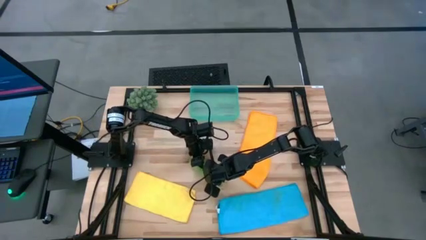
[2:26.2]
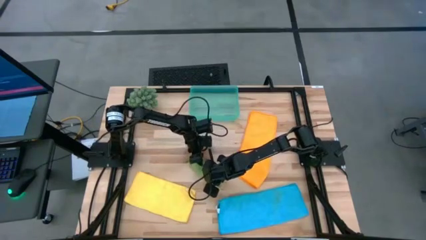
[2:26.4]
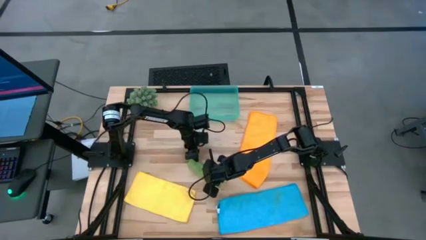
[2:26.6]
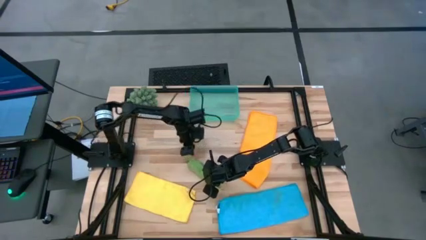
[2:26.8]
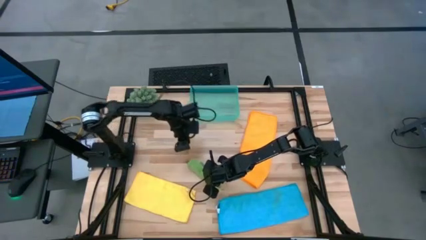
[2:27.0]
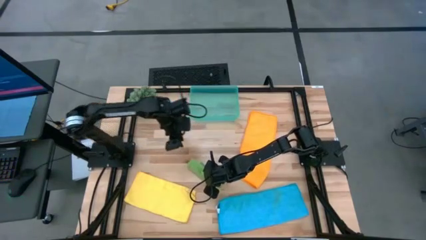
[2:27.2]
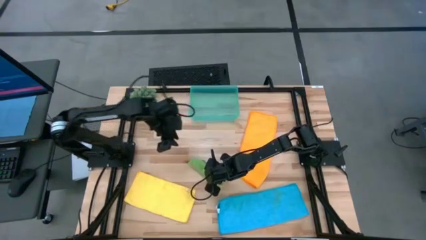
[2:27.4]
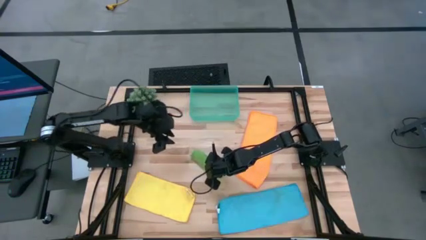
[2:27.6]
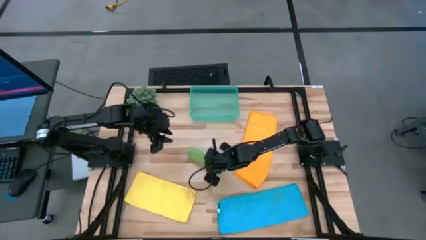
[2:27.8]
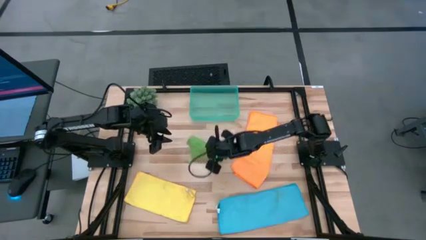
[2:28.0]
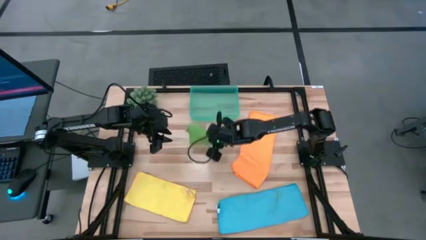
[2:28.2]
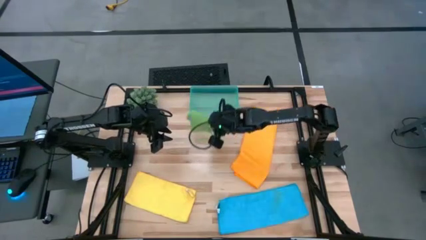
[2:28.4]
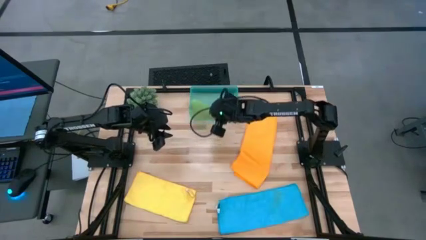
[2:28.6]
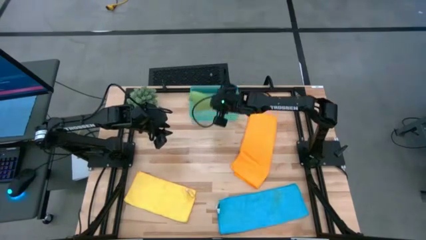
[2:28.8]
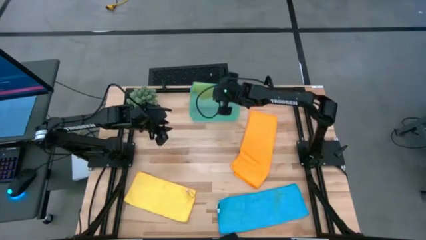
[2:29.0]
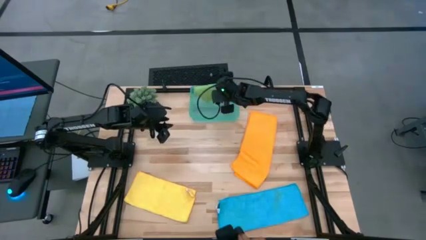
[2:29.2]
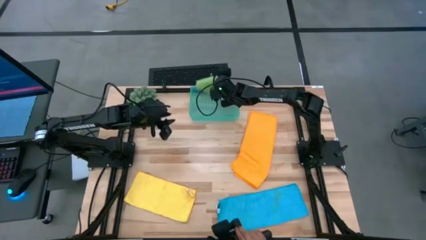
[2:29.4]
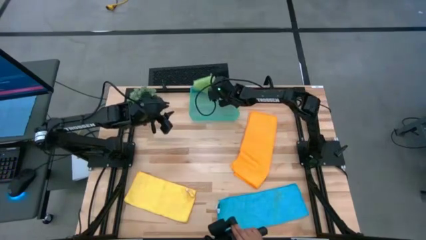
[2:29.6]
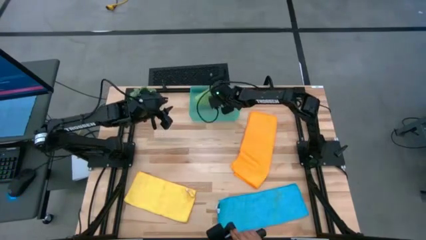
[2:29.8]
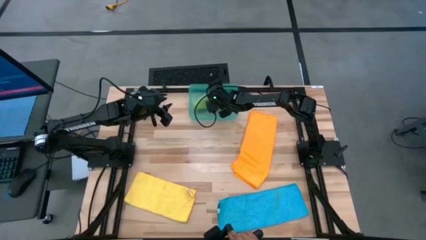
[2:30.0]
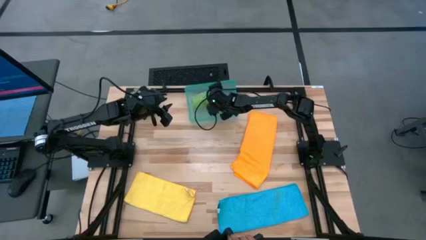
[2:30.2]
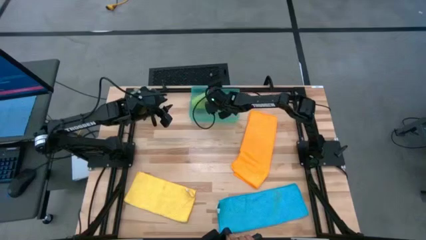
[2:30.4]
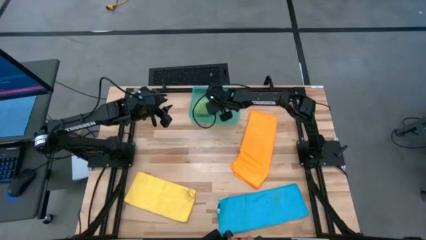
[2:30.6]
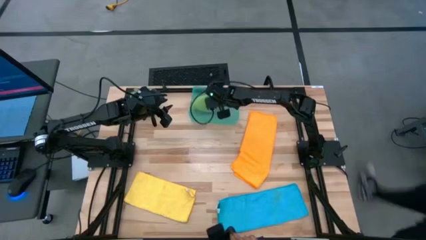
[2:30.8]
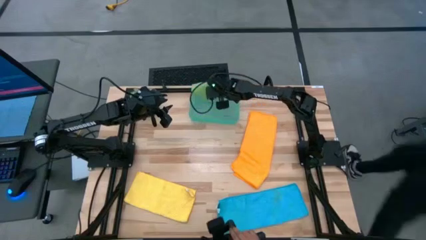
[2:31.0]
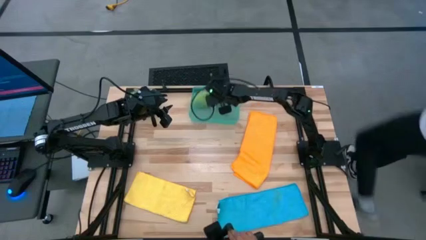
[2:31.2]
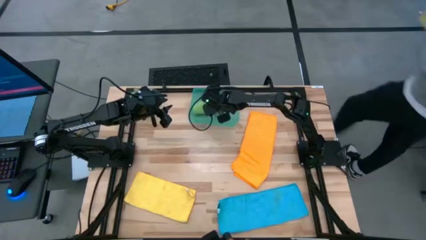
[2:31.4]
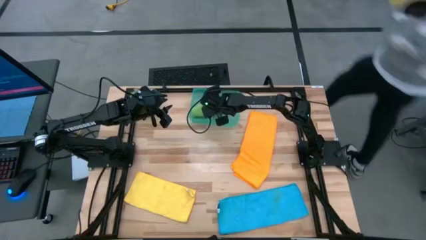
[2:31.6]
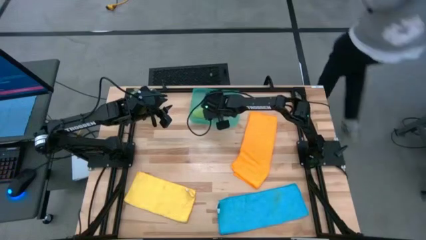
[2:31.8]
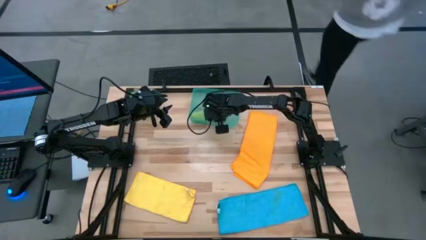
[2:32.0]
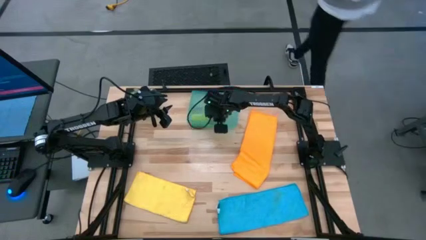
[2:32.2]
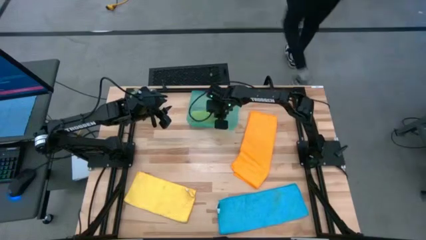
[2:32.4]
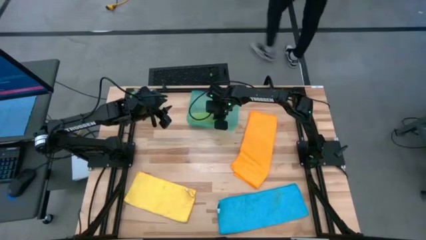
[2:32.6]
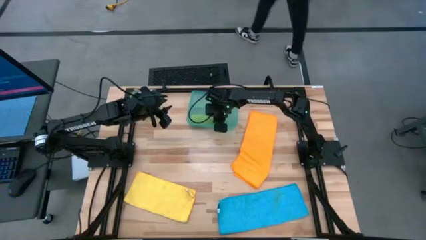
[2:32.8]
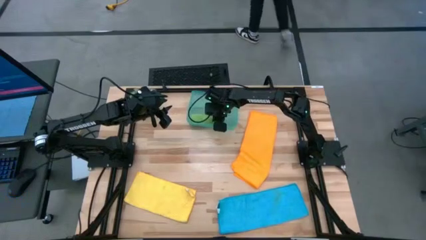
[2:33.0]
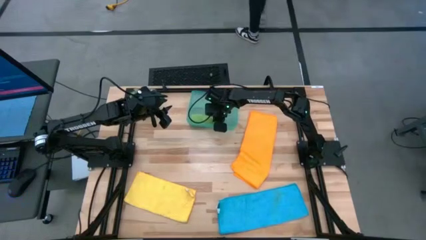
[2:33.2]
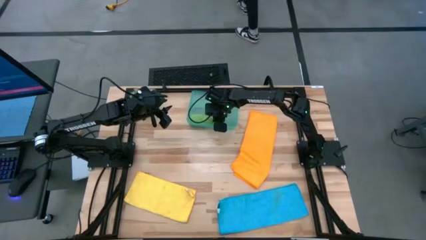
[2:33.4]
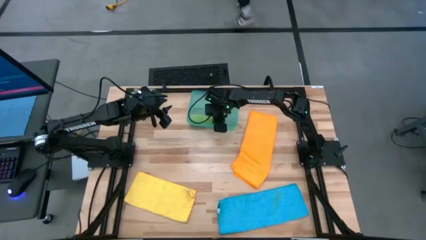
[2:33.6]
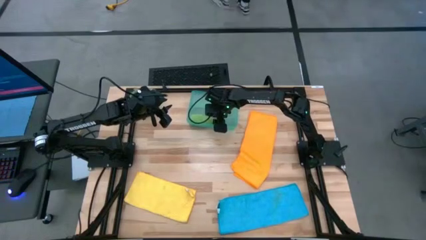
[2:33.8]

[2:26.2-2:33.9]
Task: Roll microfiber towels into tight, uniform cylinder then place into a basket
Put the rolled green towel into the blue bin

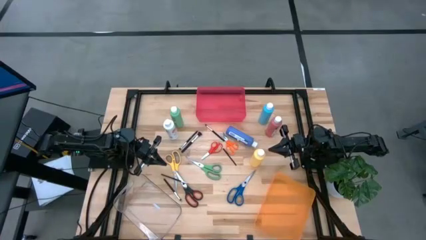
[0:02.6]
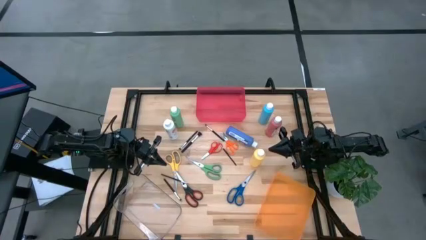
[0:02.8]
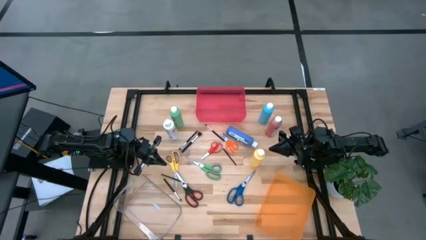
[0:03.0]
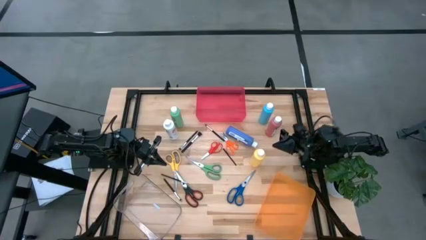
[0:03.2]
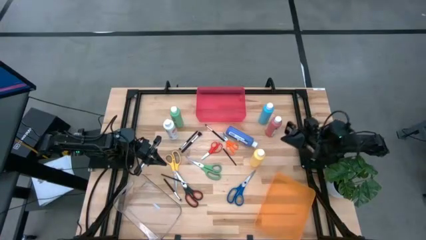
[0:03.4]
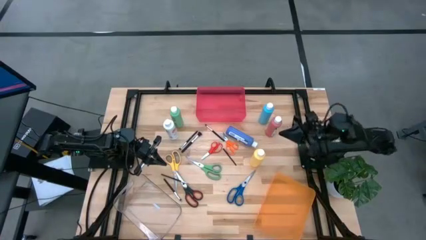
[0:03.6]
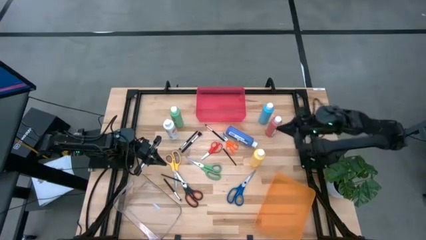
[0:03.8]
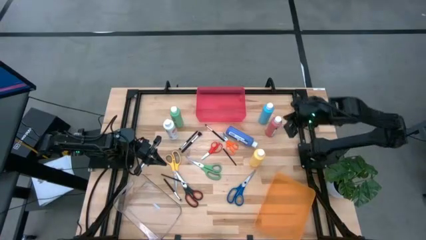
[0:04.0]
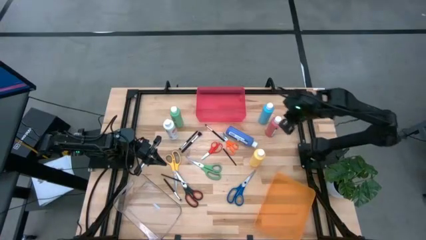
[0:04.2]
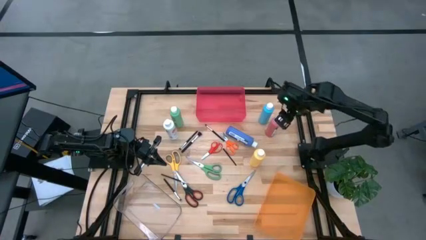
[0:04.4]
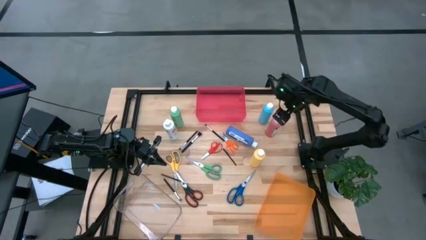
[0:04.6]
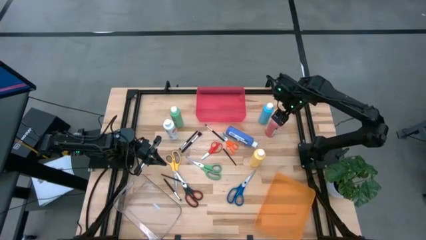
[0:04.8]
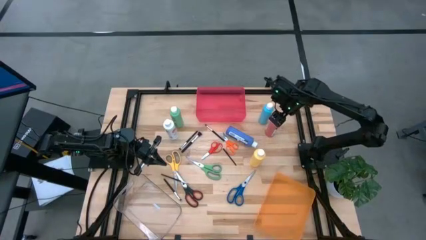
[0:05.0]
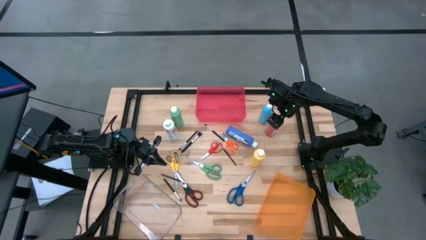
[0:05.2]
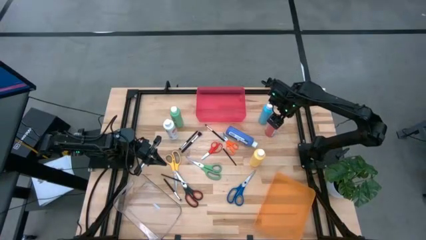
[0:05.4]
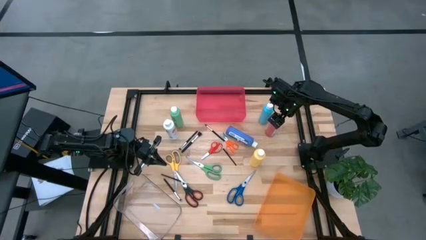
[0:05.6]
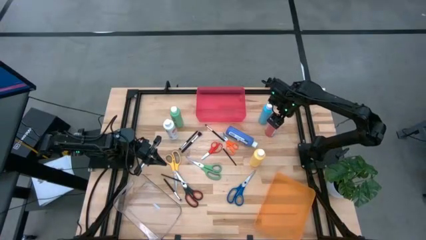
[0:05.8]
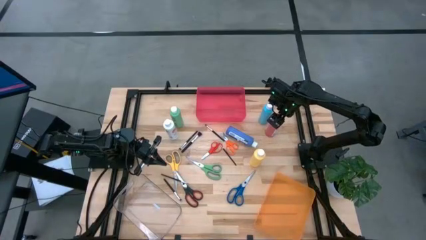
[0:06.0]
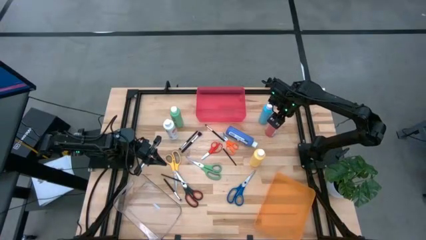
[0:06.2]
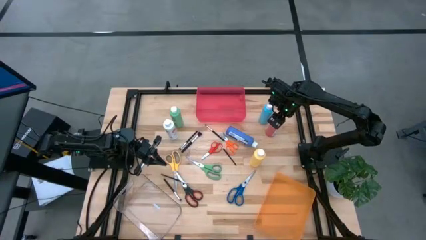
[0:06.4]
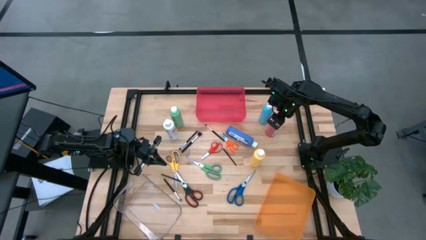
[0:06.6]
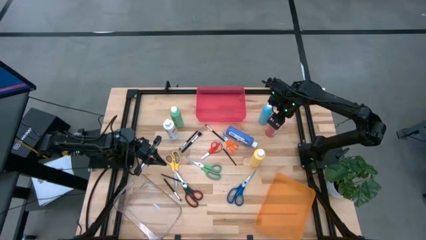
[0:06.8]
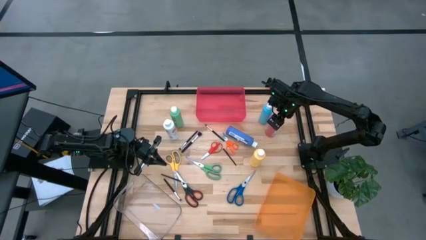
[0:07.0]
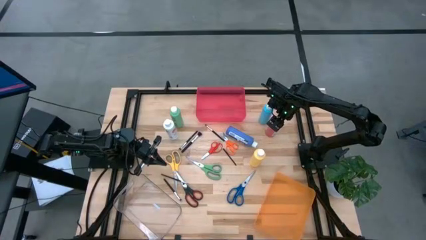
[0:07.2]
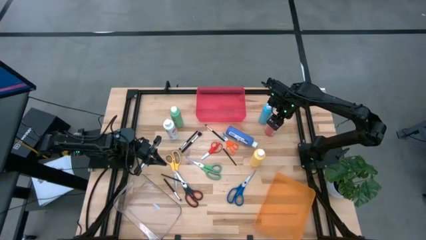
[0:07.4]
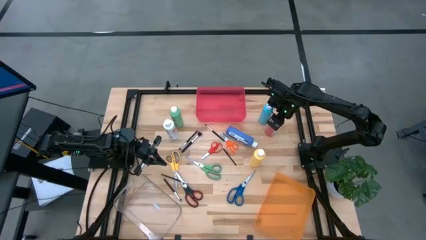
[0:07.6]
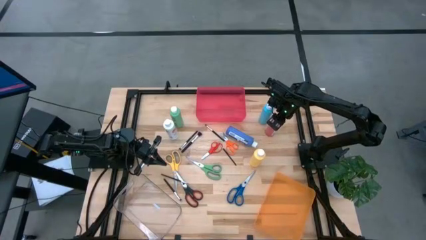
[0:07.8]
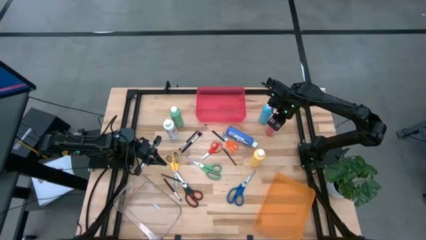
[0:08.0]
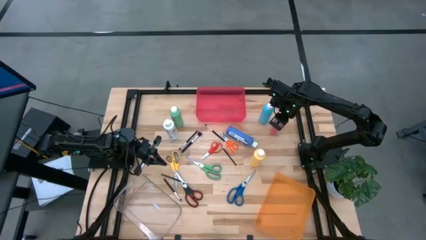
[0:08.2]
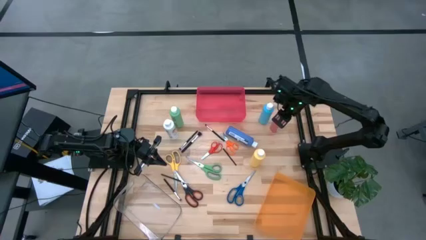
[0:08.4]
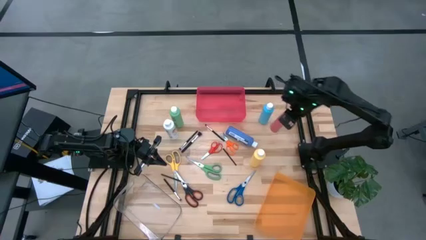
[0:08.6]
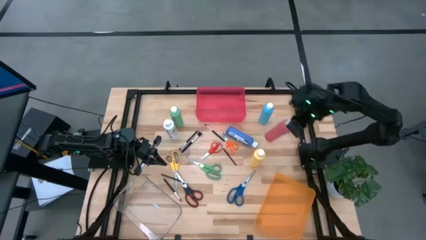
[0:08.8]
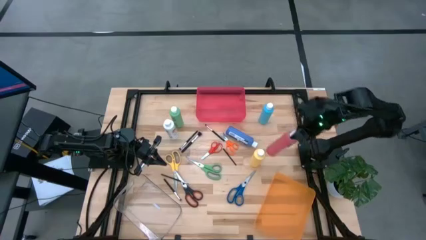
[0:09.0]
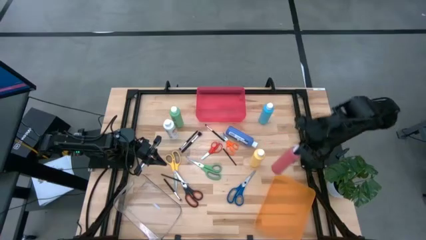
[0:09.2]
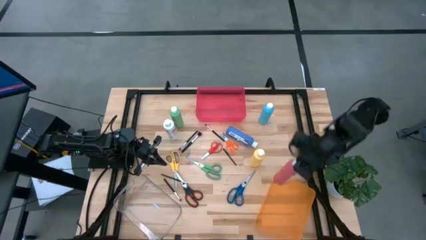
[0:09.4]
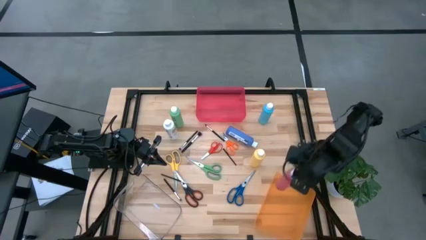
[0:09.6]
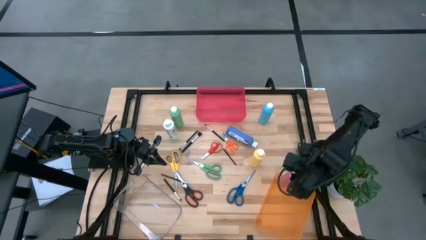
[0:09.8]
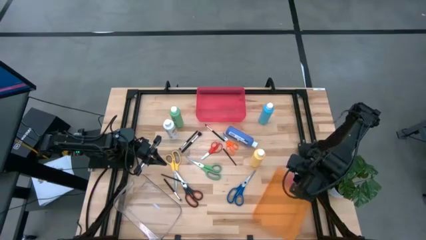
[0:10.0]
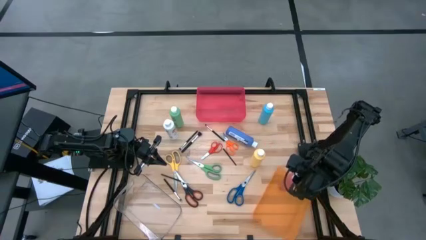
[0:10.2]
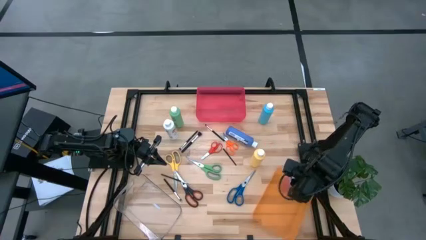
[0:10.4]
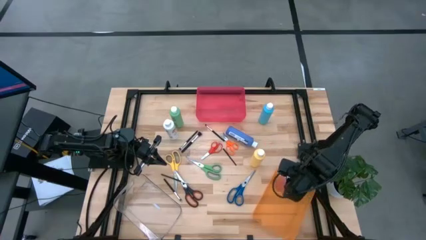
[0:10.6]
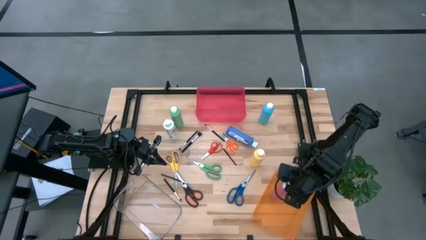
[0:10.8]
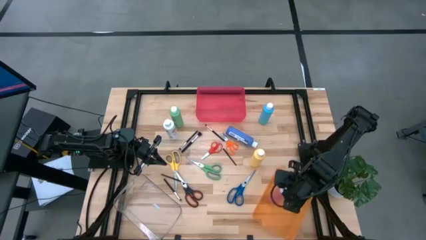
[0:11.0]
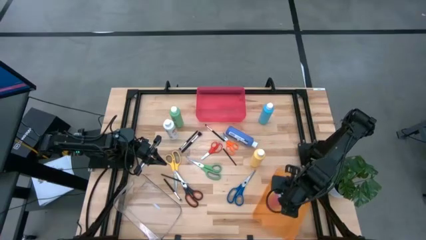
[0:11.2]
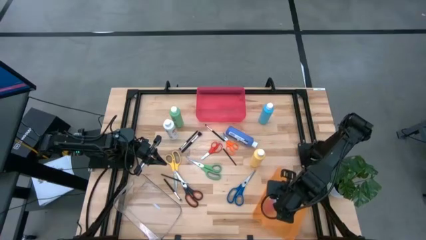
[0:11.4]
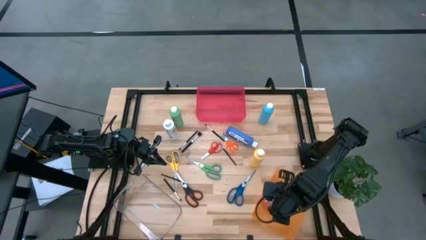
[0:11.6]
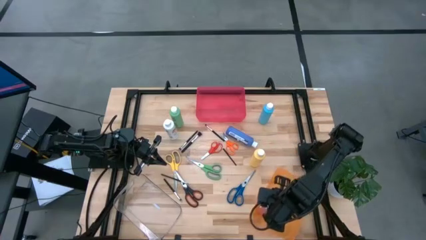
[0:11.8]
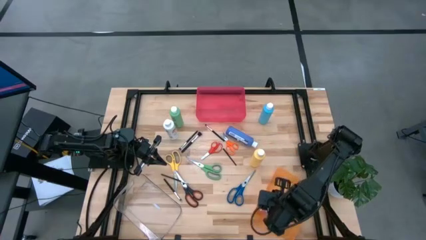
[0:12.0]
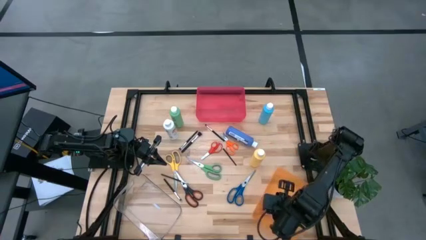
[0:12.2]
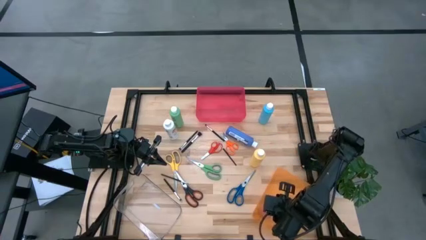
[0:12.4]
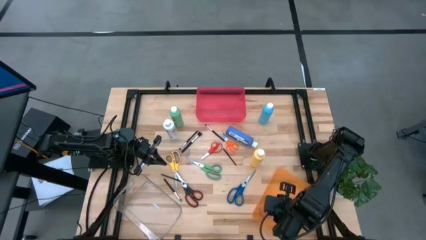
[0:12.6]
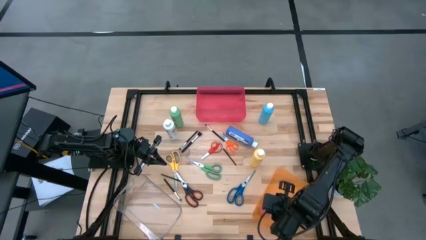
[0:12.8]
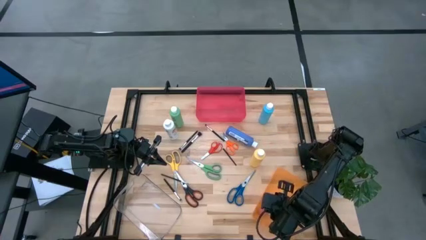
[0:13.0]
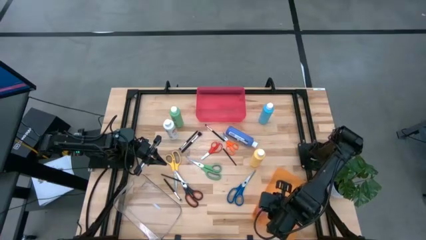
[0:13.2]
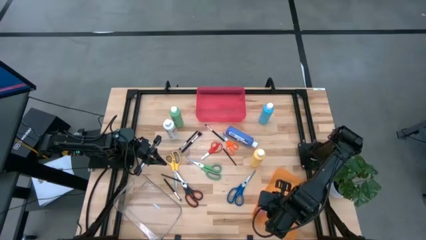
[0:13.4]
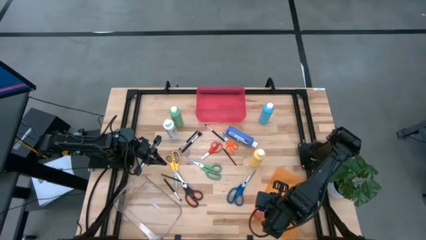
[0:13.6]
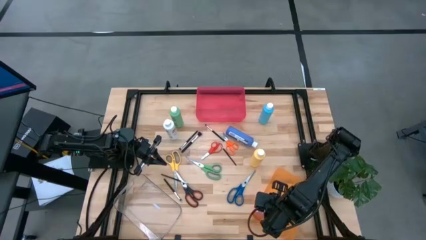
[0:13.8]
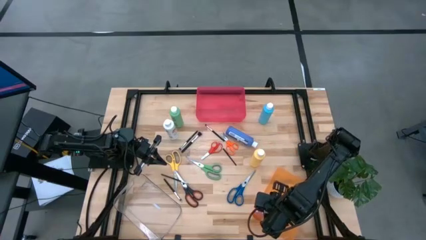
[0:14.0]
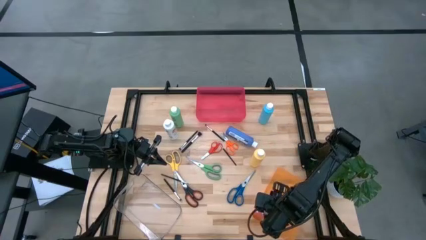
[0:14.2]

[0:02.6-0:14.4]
Task: Pick & Place Paint Supplies
Put the pink paint bottle into the orange bin
